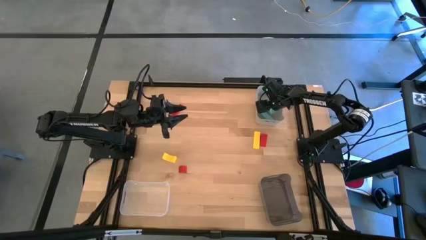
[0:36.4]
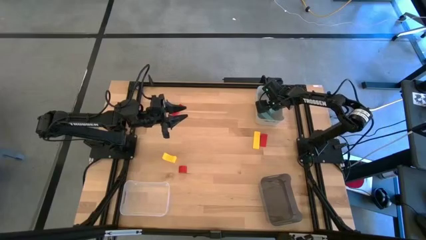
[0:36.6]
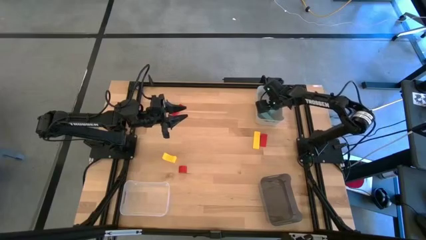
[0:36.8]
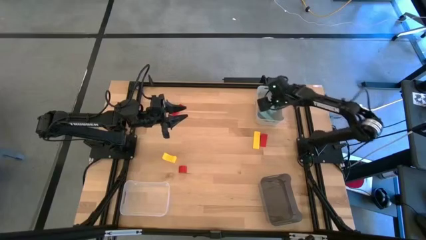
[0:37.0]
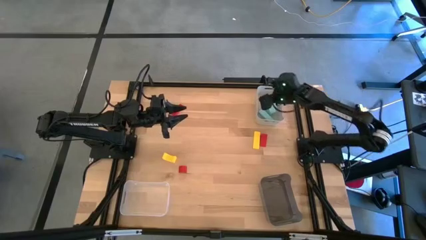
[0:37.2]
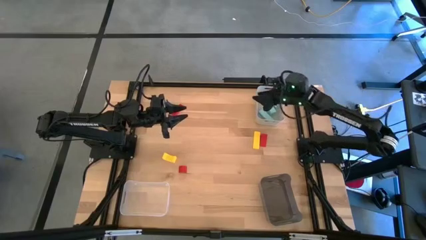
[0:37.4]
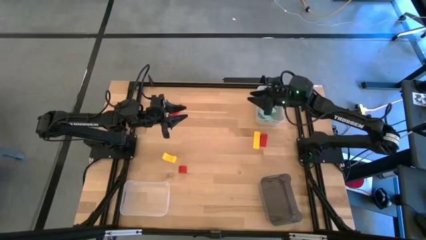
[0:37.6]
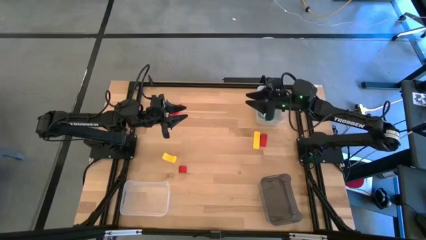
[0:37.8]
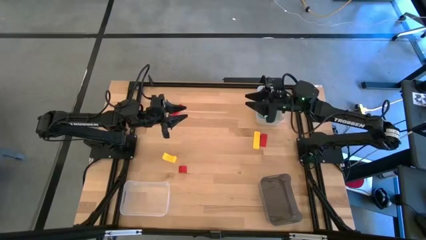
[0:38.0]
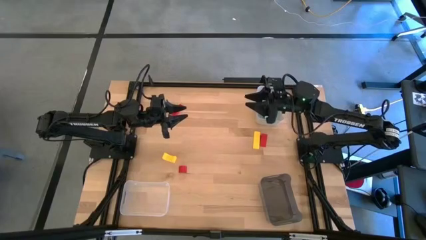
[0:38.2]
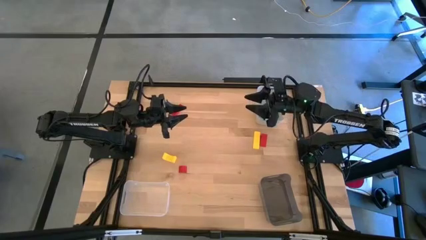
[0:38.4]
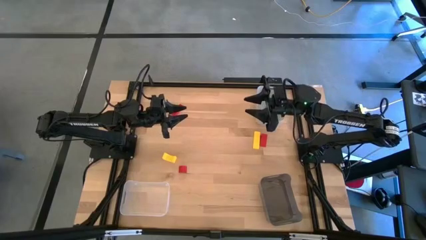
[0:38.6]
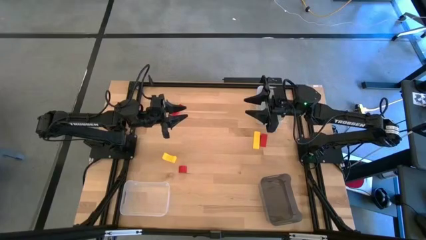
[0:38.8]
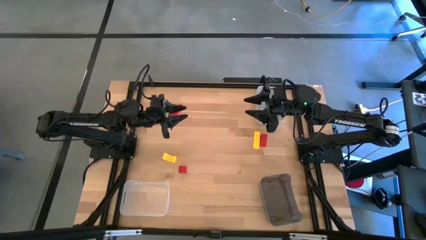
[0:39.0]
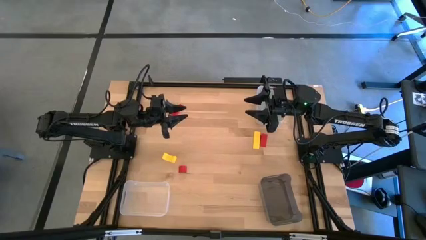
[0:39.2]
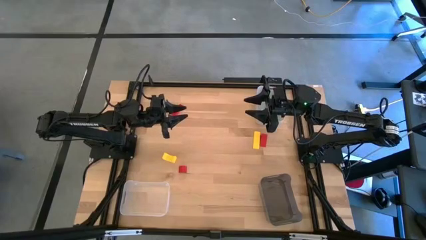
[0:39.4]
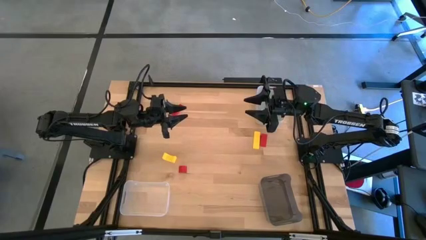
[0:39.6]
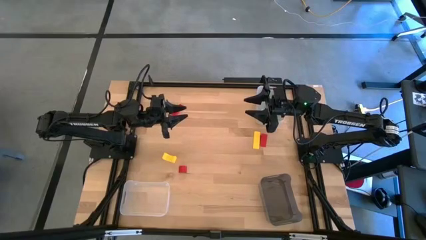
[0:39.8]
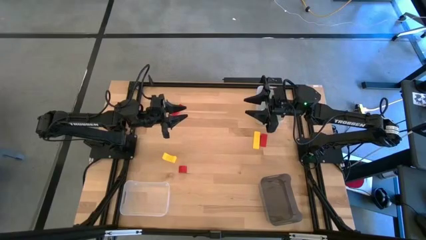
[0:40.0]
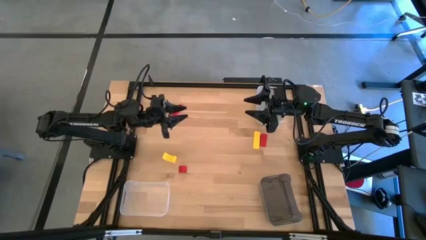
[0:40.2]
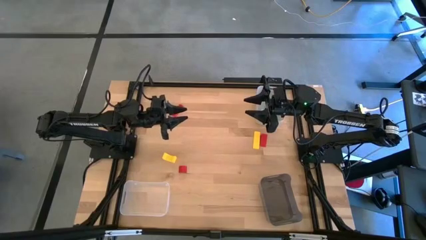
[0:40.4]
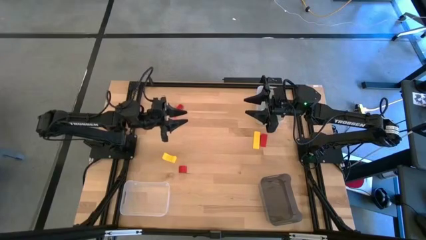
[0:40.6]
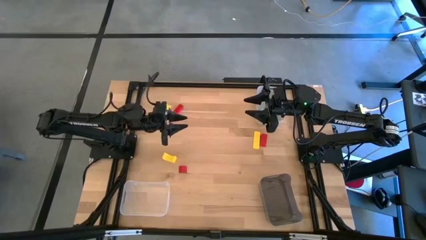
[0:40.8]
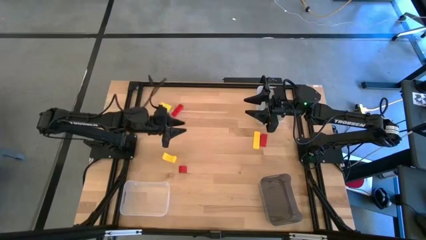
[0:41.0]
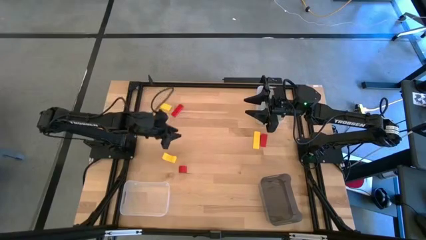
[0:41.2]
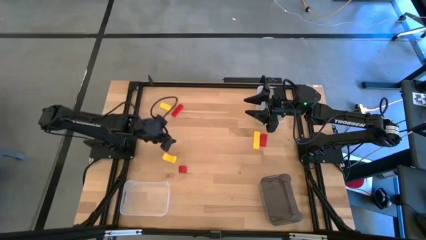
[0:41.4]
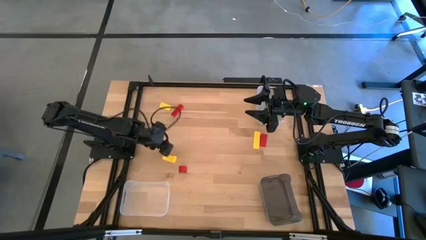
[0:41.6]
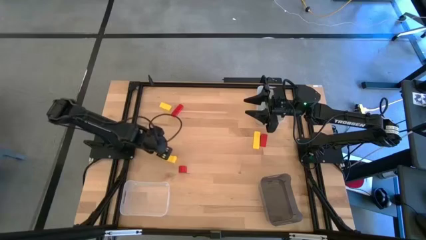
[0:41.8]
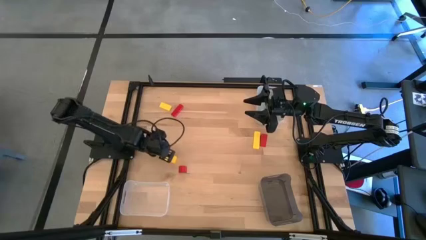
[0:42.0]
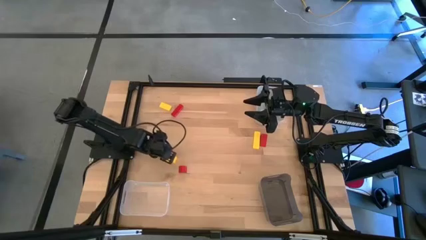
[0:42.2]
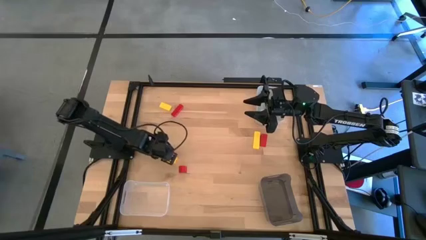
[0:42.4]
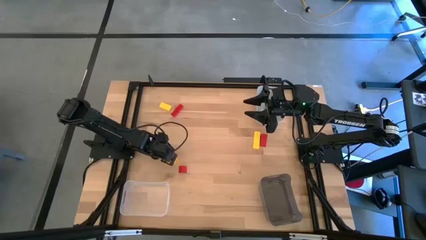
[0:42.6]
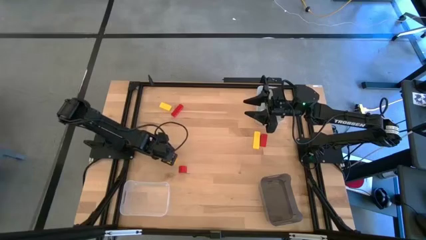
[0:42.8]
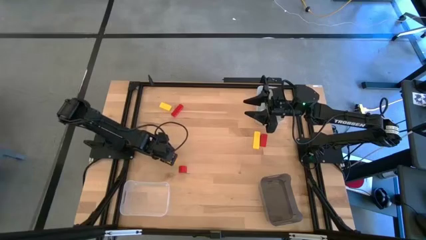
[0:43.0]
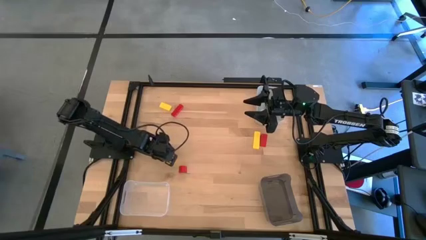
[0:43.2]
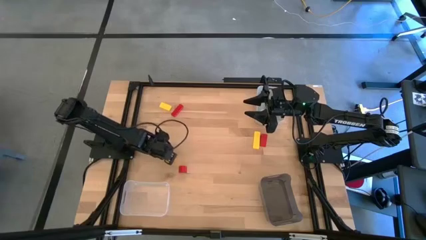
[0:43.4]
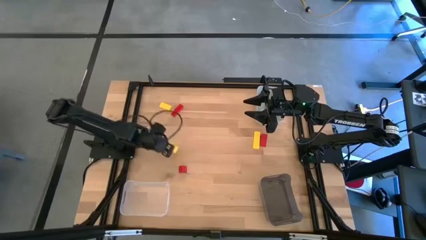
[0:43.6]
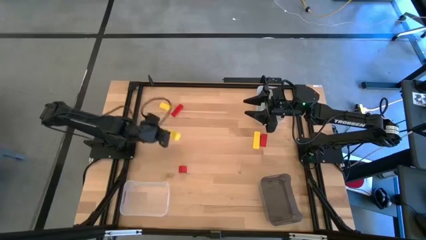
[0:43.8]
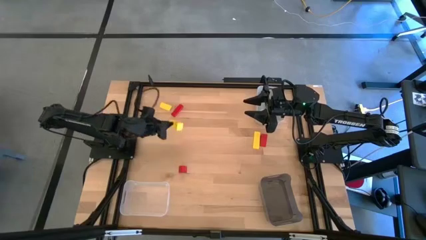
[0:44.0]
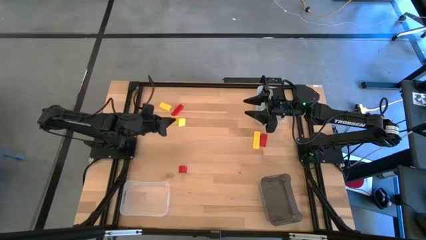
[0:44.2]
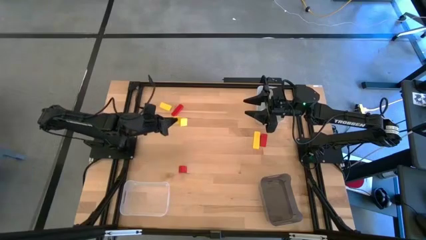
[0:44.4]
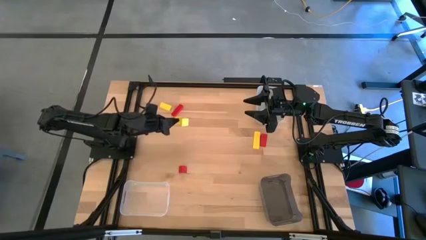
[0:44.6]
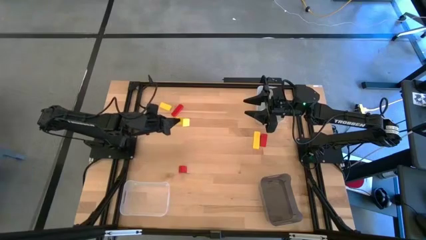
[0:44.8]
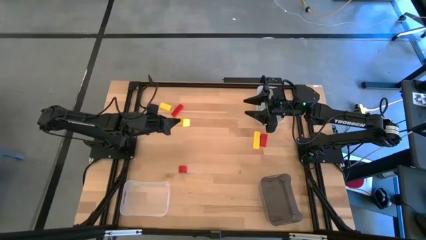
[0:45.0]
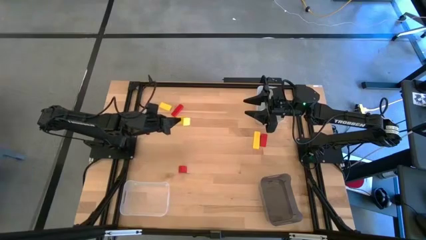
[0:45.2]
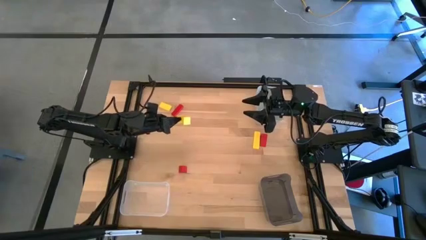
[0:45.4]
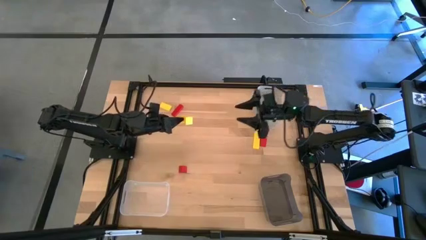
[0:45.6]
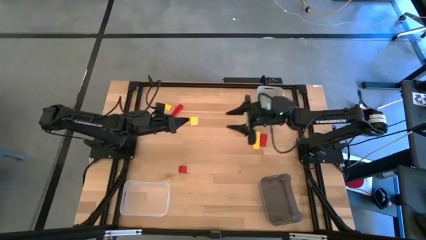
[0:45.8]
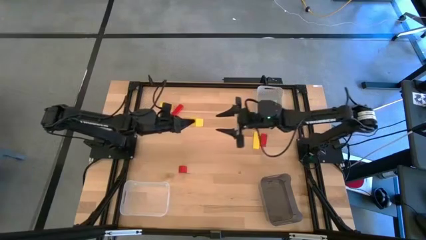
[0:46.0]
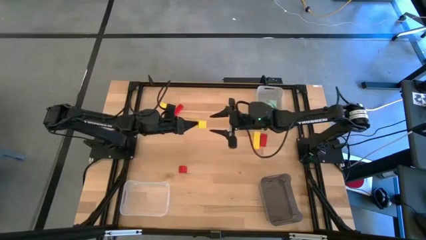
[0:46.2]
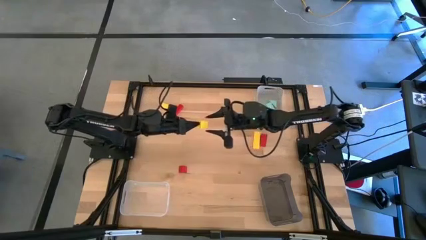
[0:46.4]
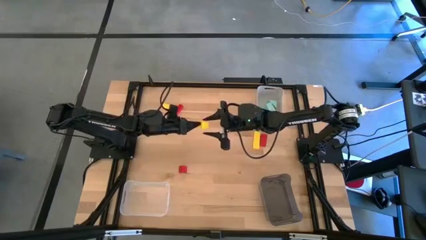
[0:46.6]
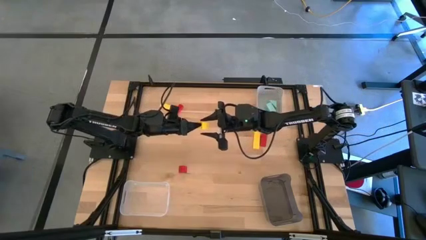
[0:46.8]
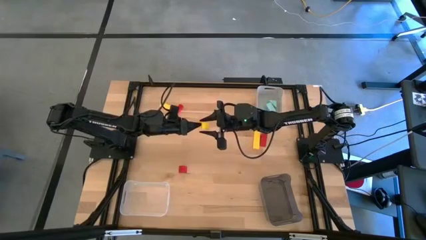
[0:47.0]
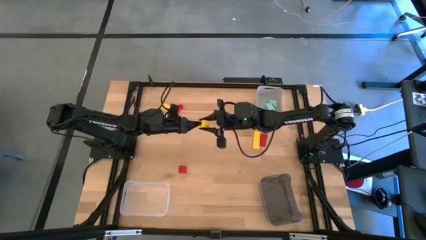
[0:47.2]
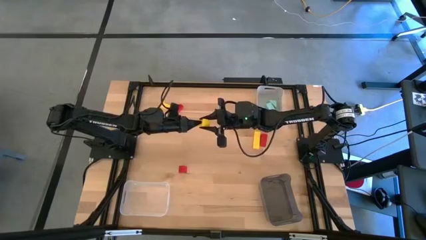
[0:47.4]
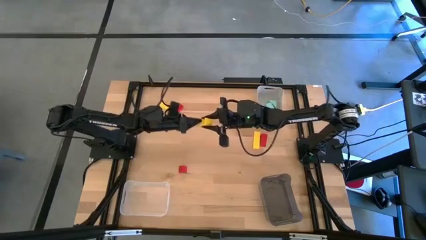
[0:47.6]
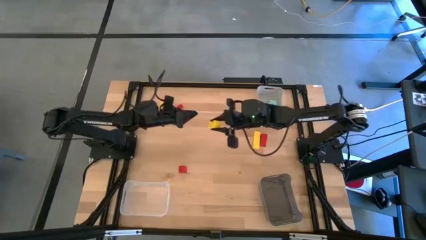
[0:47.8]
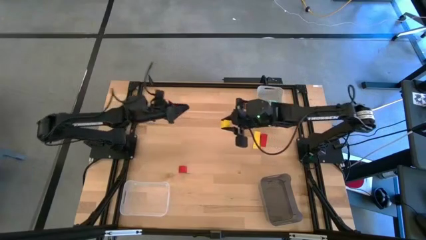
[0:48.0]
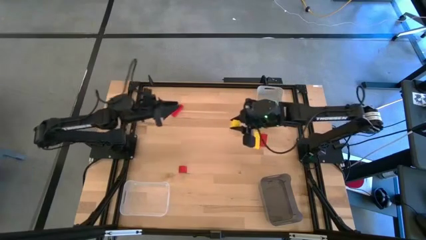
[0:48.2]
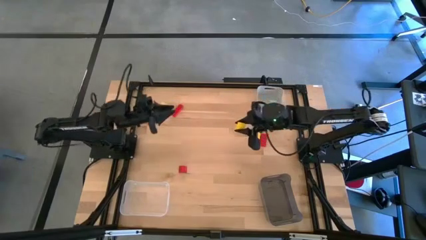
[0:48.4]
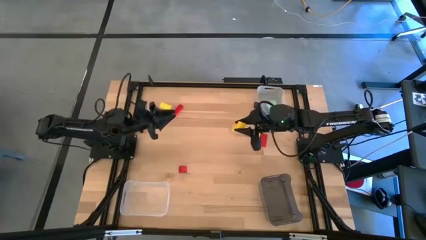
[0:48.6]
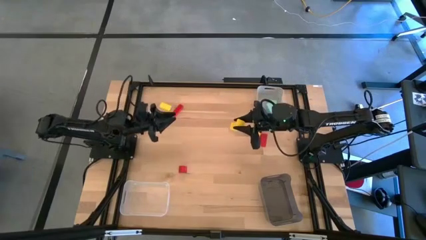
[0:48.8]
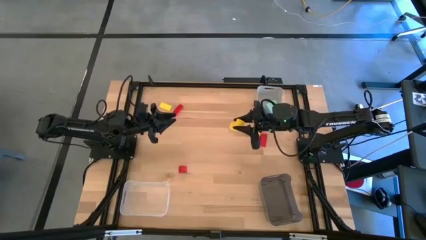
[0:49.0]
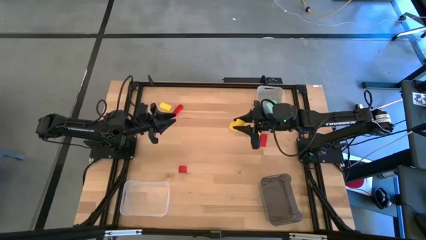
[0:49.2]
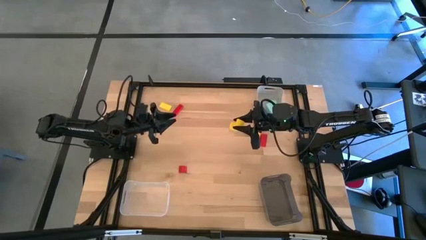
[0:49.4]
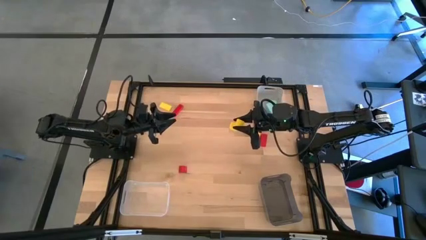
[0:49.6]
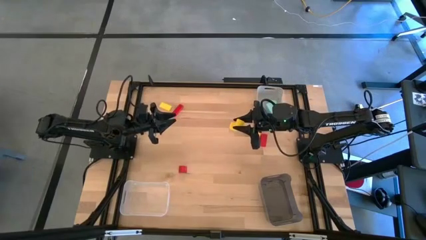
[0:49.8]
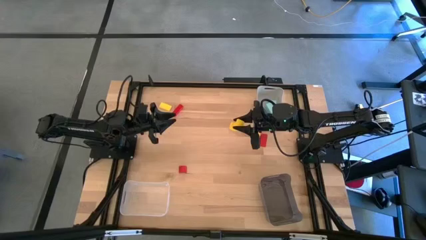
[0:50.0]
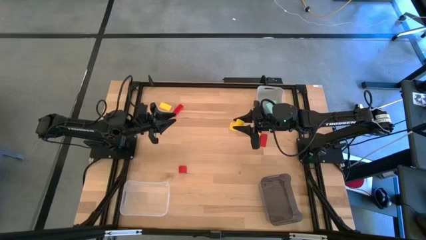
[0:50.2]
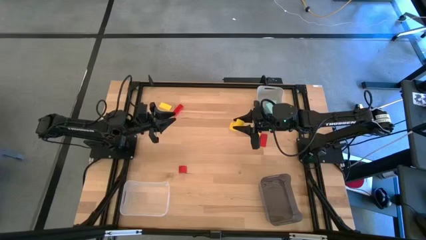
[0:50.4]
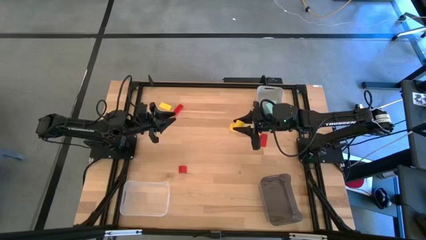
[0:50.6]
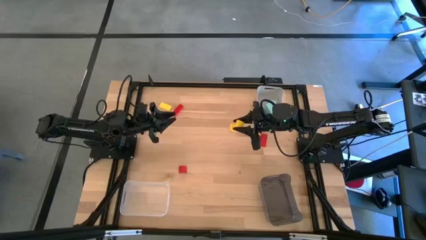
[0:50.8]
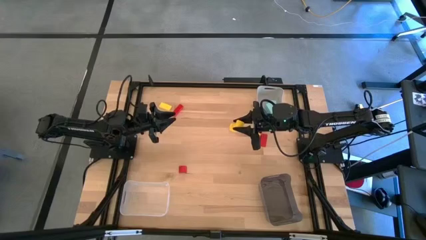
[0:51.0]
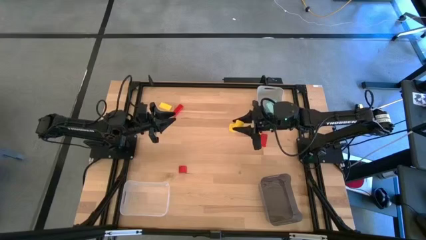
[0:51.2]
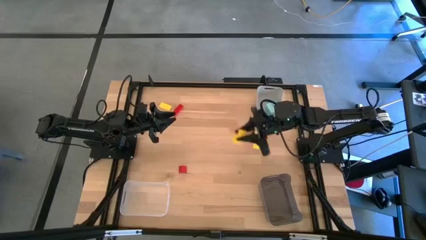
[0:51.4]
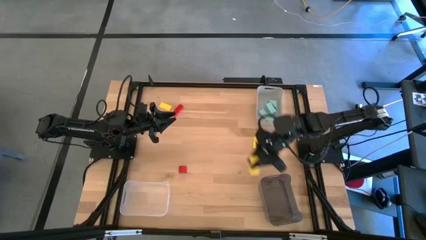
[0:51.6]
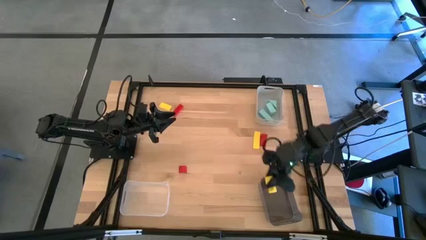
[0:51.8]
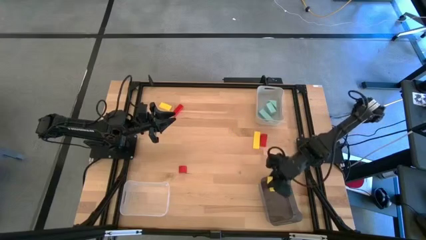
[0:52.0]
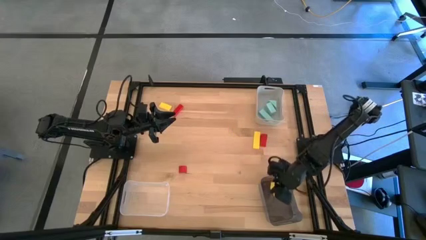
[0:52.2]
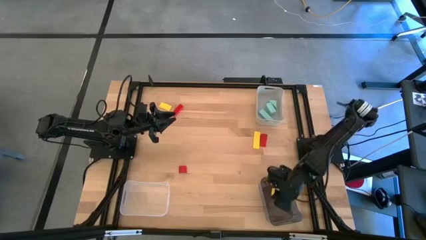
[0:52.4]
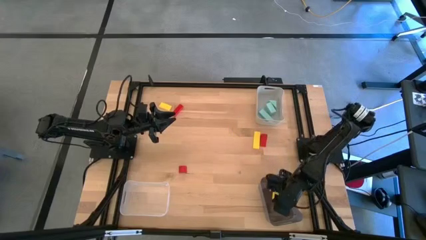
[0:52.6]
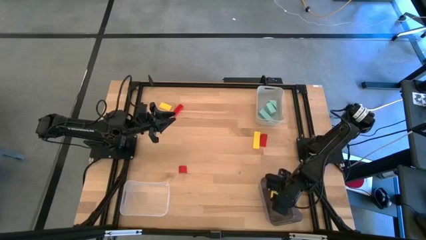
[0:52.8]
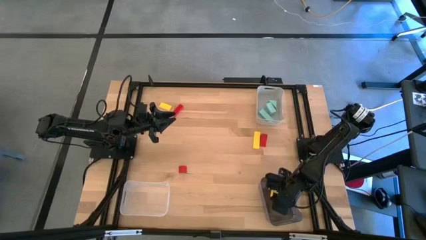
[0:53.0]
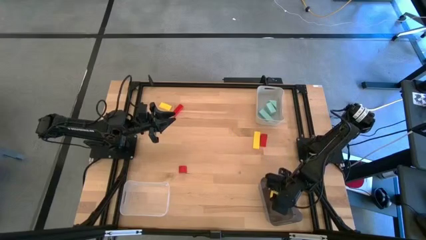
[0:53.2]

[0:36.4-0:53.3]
Task: Sort & place blocks by color
Put the bottom left yellow block into the black bin
